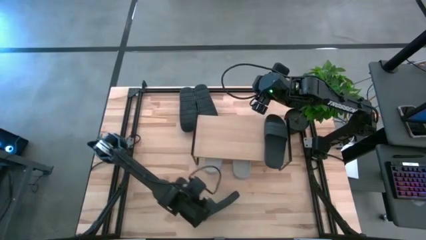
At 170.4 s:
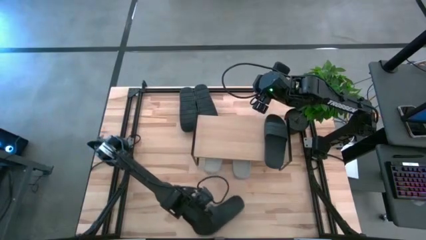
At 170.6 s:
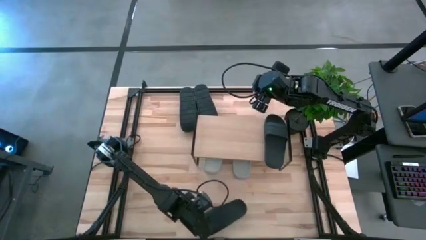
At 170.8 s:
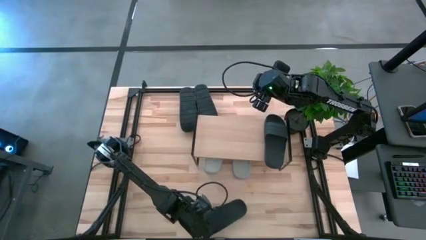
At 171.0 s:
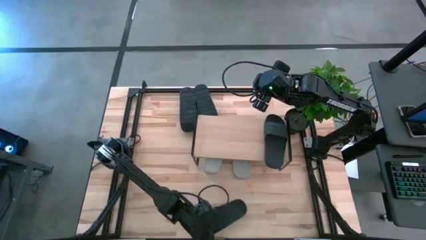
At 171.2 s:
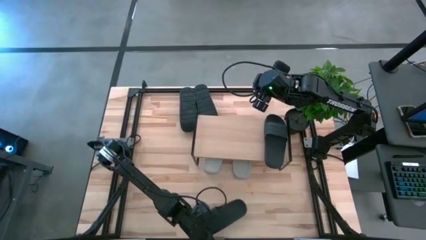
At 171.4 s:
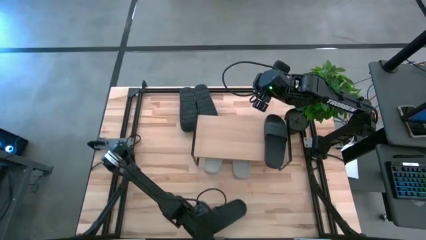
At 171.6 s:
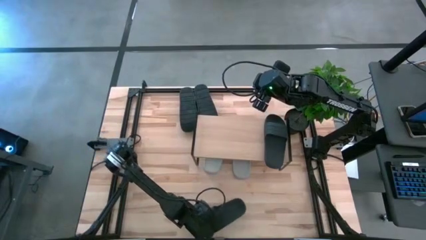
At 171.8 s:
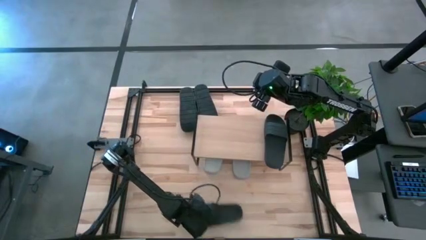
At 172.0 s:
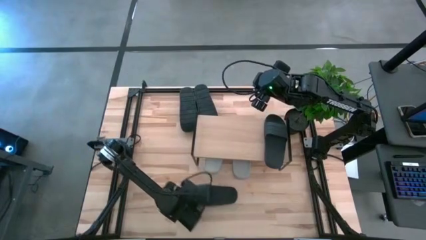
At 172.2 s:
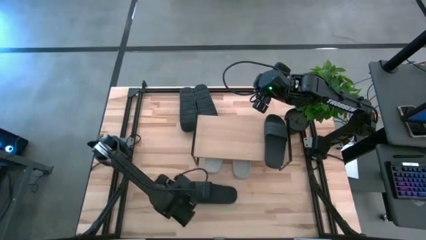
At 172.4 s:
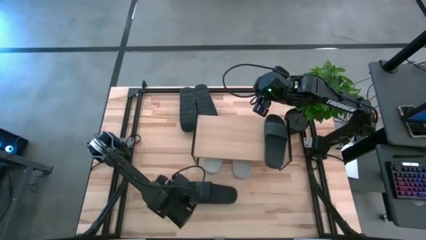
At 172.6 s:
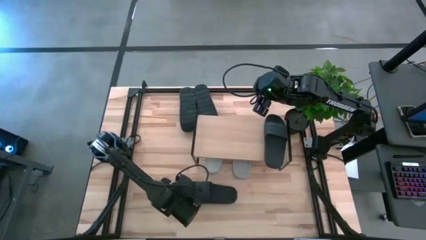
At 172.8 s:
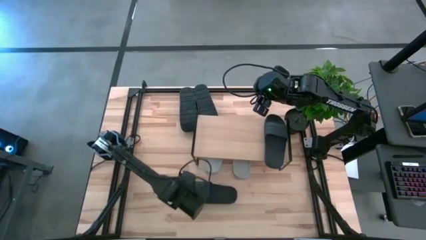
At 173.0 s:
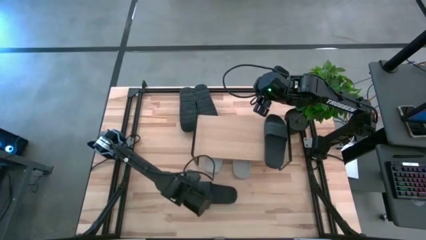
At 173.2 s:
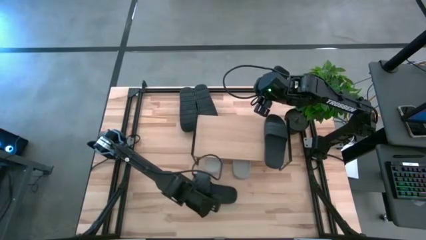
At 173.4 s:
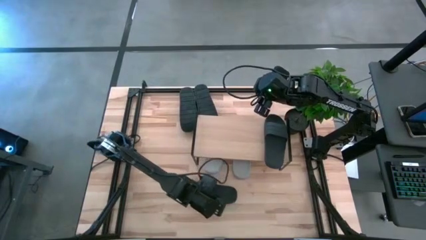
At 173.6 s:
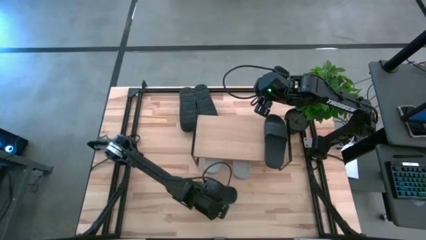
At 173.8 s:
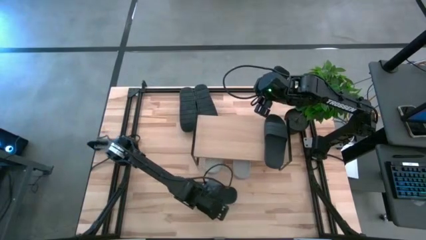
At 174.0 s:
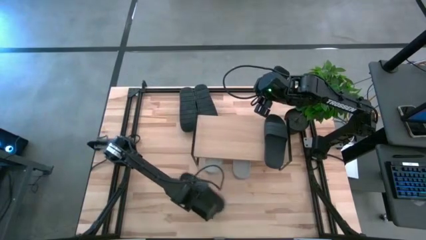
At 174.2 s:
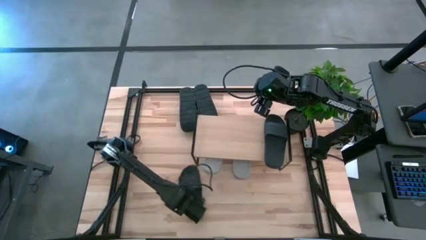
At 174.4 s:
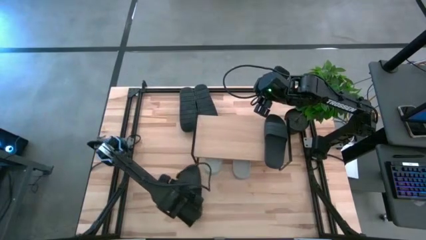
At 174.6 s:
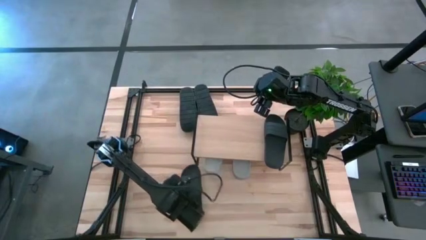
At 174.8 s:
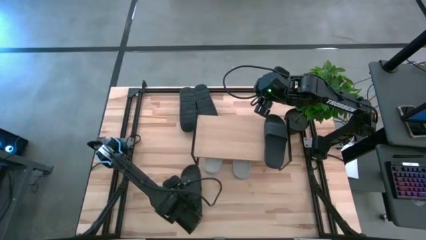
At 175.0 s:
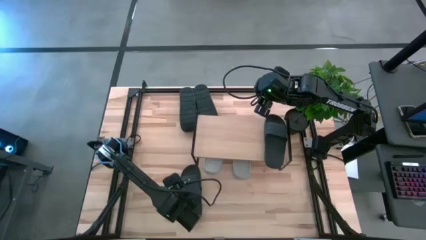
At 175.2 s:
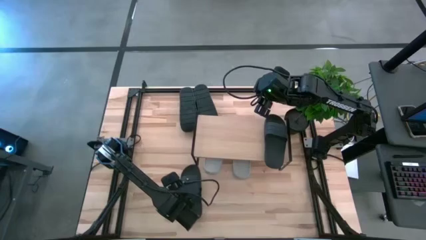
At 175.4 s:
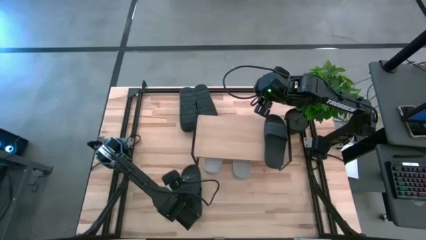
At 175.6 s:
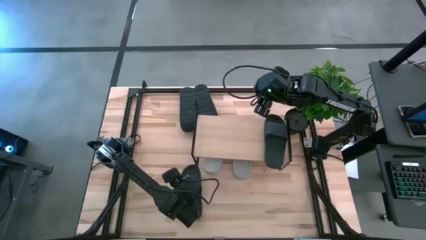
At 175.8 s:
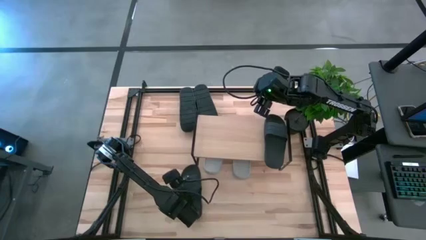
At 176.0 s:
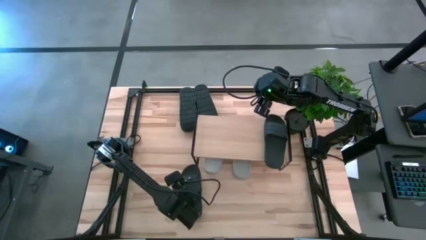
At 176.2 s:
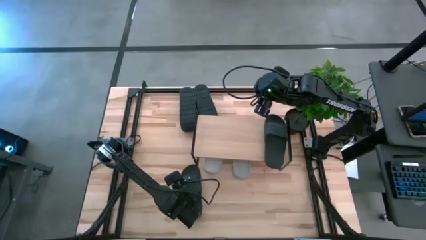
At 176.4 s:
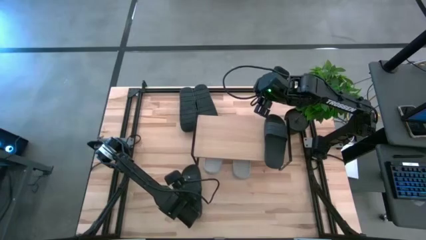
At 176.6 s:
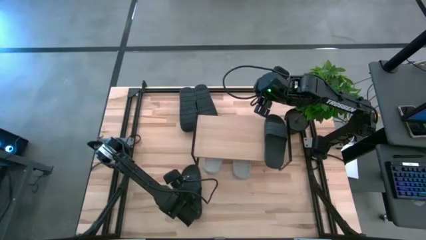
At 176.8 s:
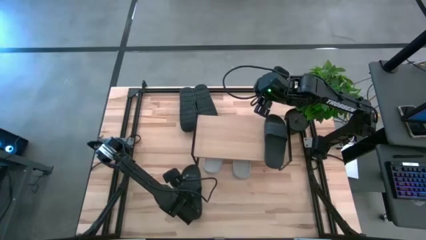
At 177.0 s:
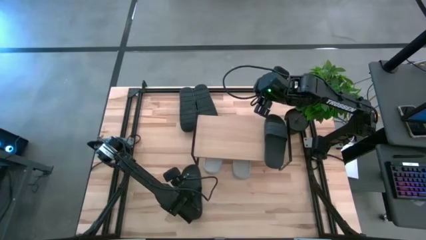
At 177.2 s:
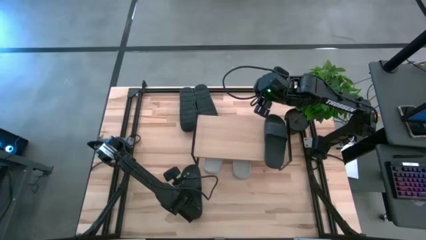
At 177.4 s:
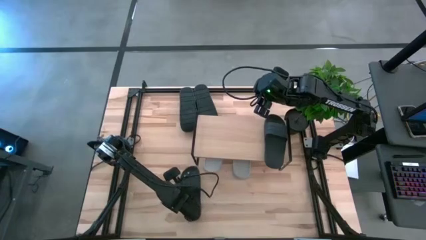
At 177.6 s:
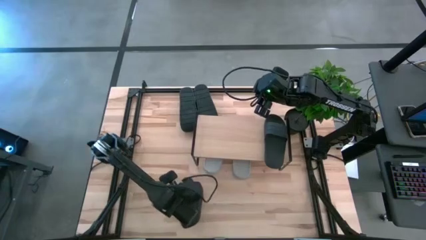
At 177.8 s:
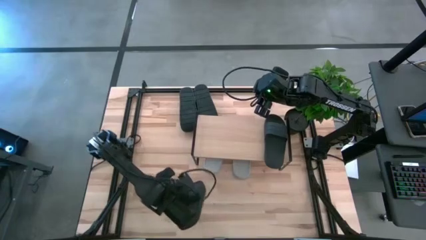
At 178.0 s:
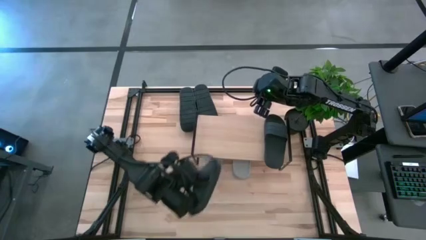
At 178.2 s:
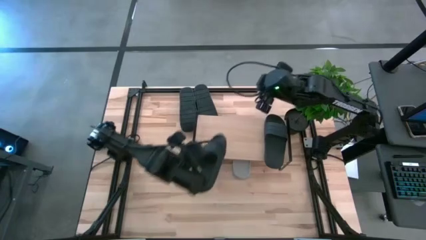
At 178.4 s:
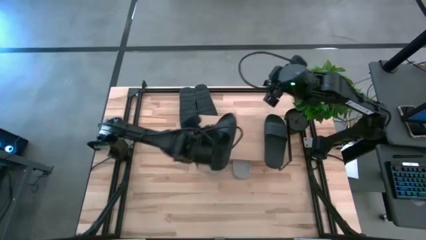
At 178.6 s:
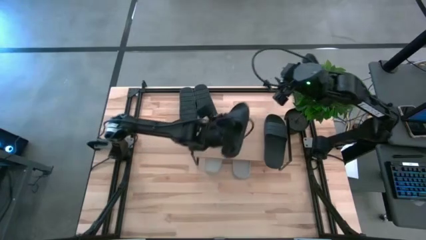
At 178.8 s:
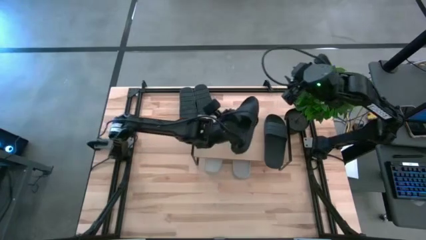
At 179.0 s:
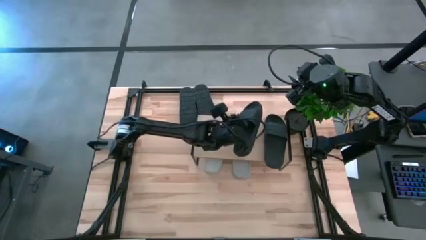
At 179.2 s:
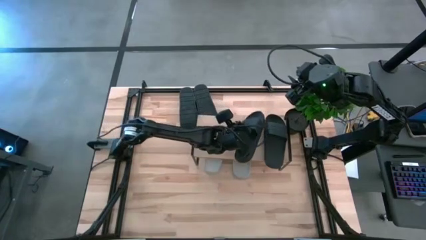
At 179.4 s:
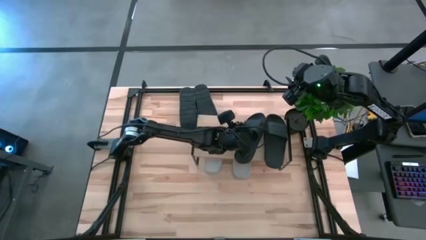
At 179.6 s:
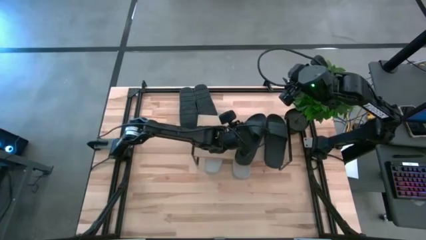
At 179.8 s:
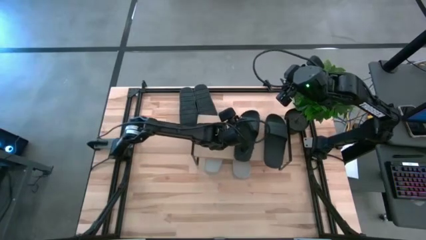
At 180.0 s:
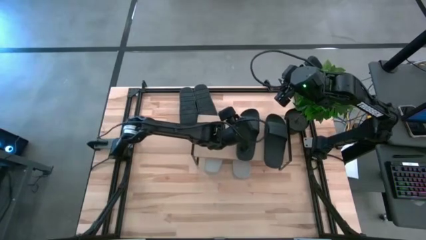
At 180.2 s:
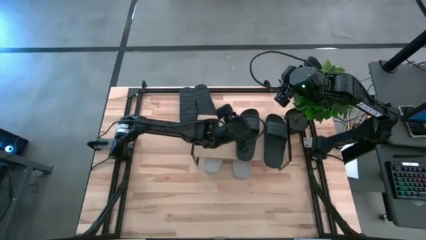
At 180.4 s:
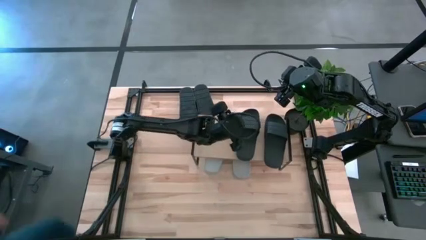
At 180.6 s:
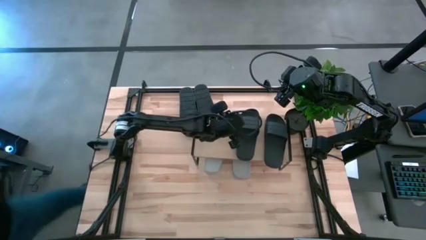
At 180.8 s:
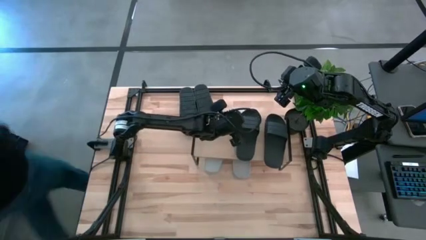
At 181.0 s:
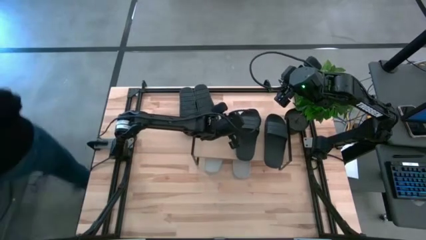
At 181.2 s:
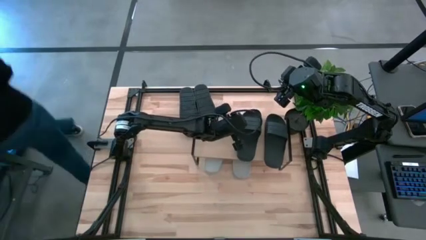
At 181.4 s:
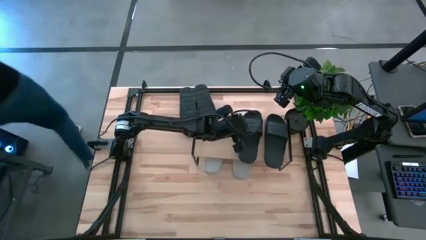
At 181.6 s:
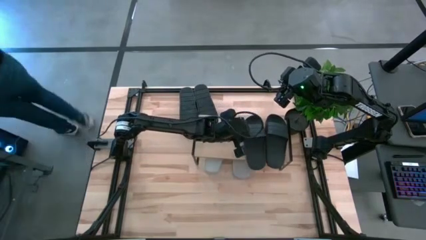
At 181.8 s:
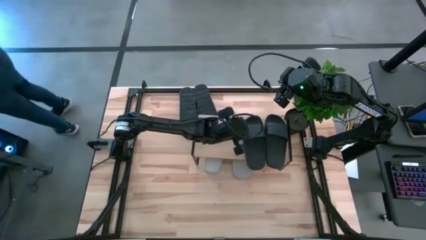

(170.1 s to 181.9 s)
Task: Pick and place slides into the shelf
Put the black slipper on the shelf

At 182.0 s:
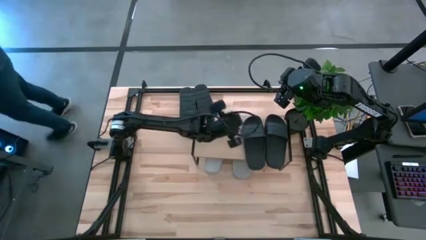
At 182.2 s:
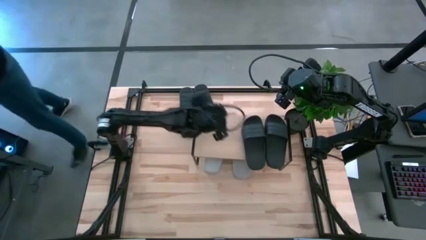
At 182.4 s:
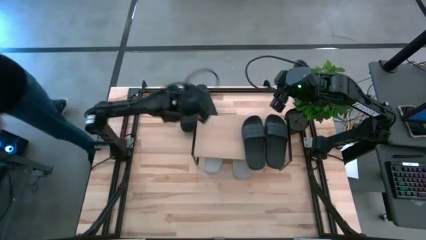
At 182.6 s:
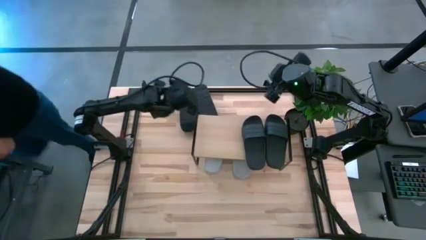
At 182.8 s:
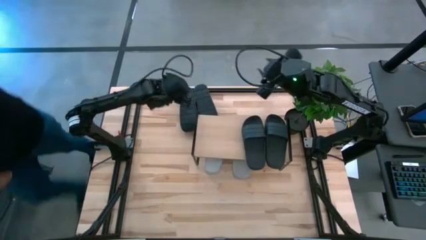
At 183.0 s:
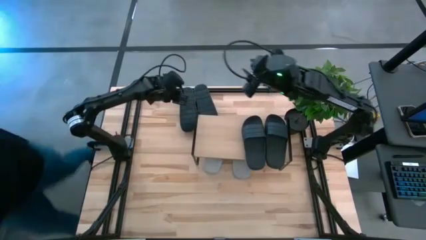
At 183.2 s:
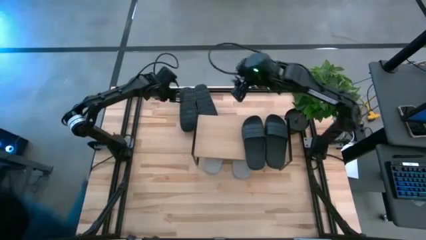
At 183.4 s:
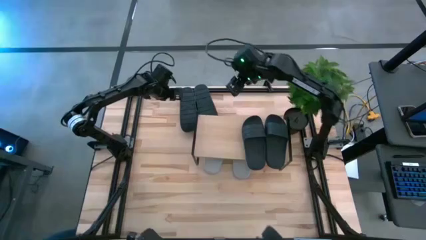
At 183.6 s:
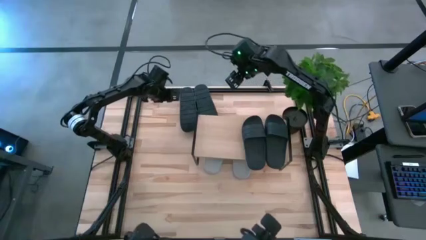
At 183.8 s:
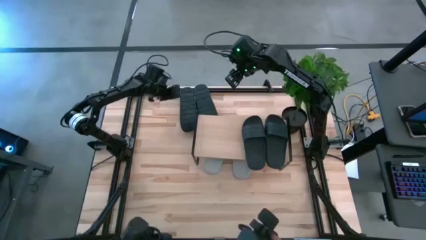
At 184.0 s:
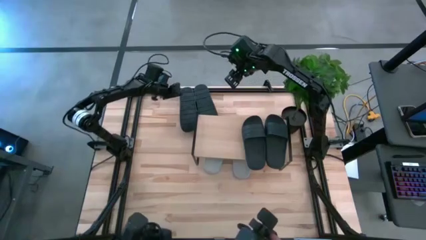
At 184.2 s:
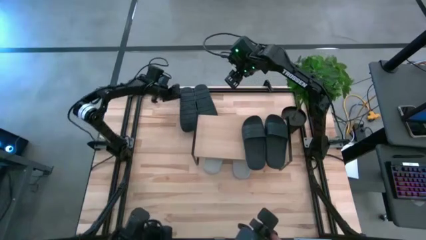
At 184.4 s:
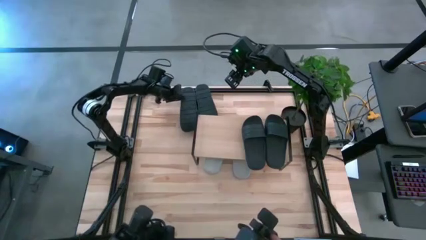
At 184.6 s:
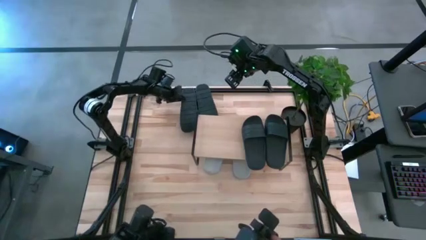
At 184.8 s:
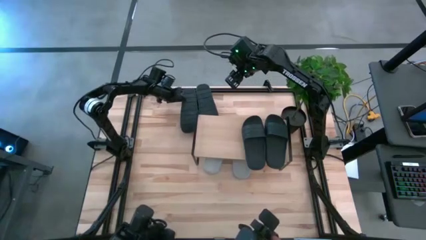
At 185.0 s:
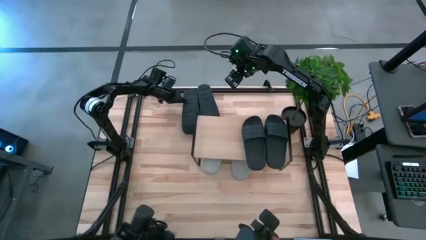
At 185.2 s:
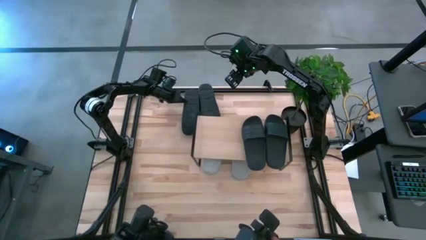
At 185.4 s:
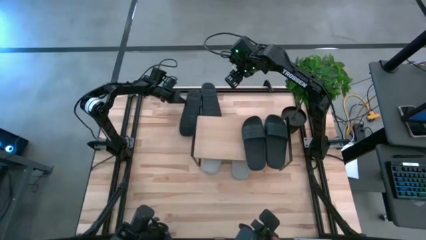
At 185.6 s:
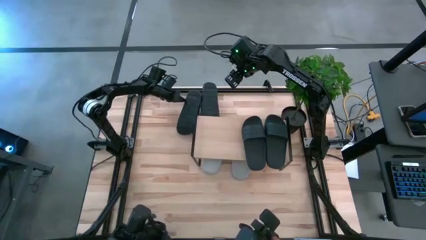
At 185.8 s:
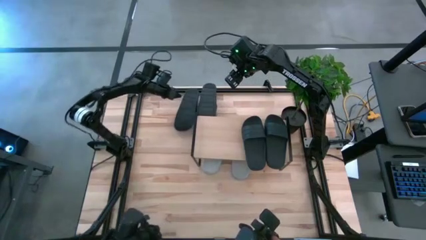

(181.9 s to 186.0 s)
Put the black slipper on the shelf
